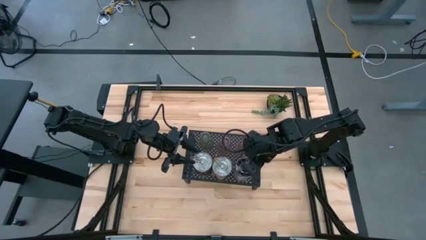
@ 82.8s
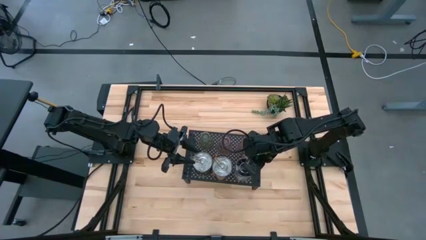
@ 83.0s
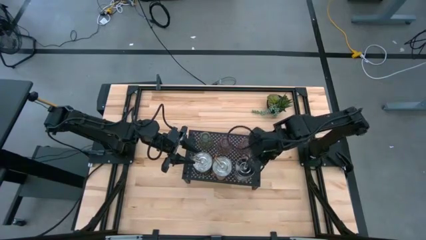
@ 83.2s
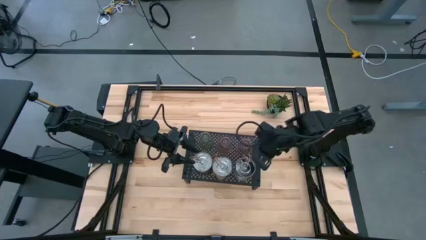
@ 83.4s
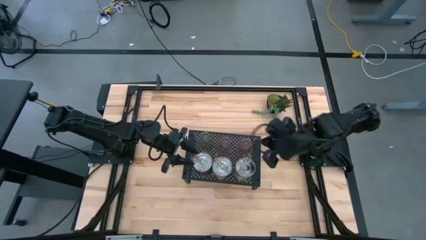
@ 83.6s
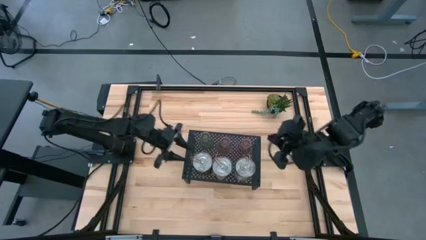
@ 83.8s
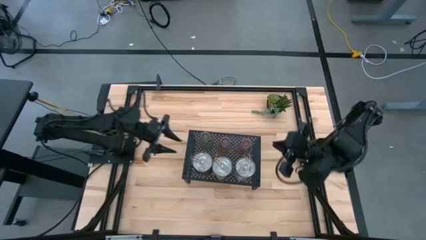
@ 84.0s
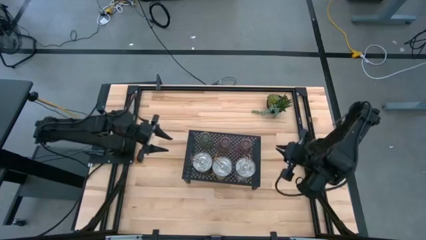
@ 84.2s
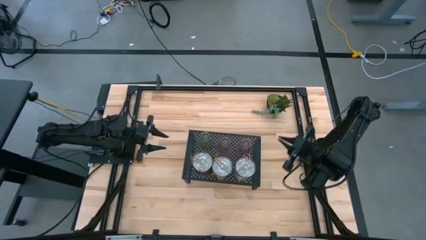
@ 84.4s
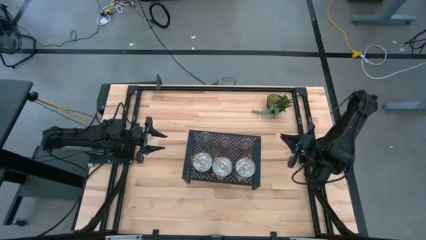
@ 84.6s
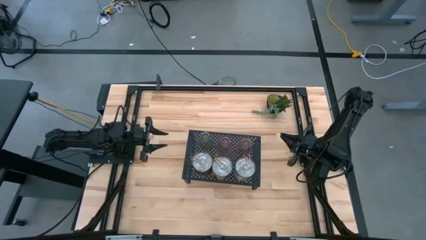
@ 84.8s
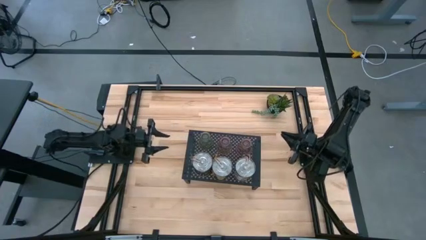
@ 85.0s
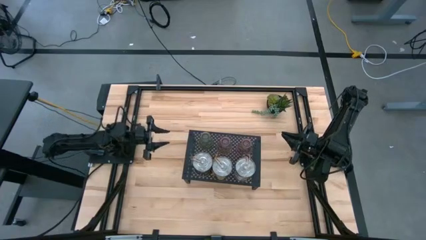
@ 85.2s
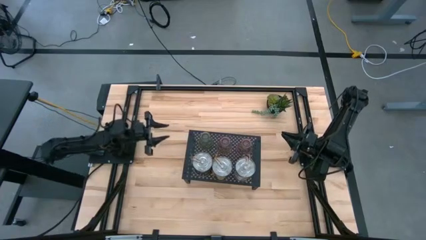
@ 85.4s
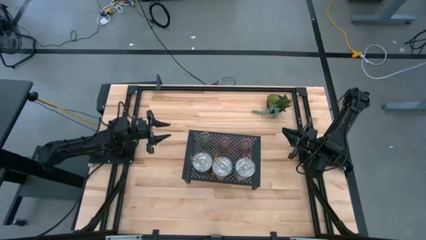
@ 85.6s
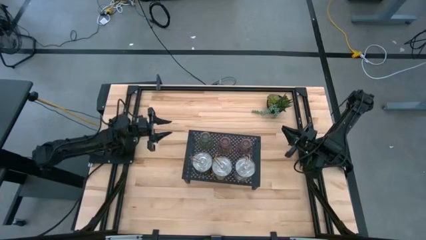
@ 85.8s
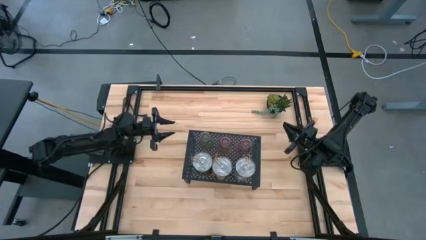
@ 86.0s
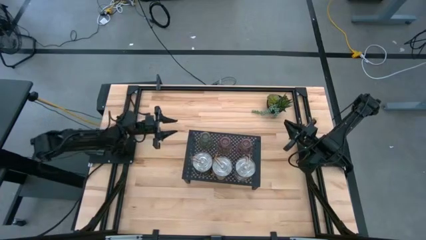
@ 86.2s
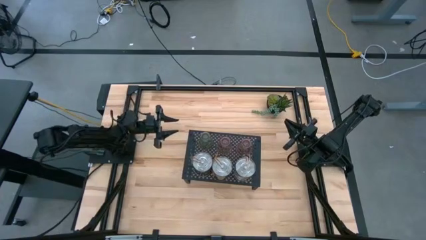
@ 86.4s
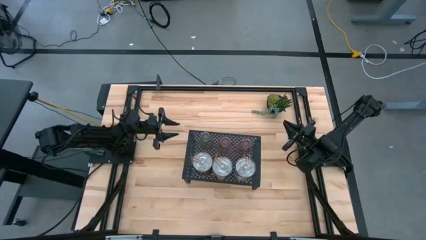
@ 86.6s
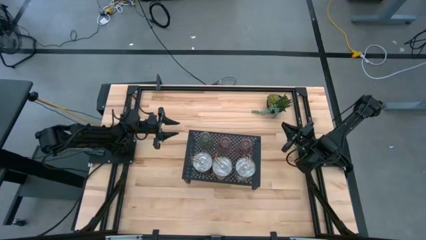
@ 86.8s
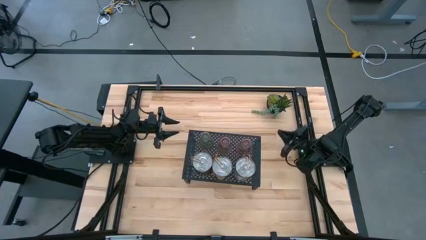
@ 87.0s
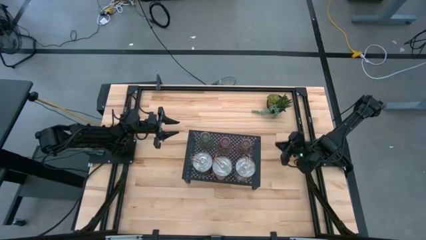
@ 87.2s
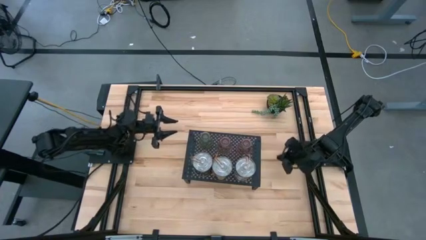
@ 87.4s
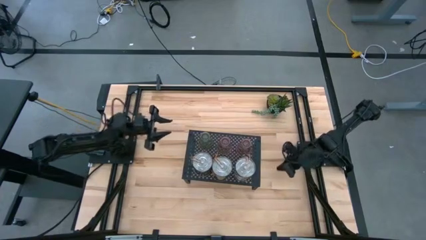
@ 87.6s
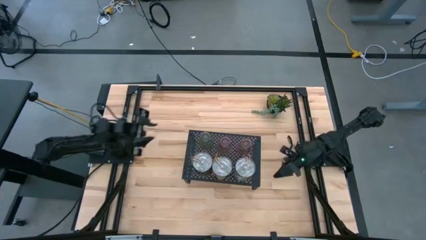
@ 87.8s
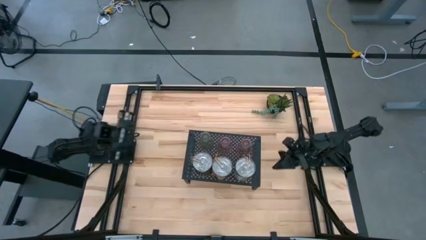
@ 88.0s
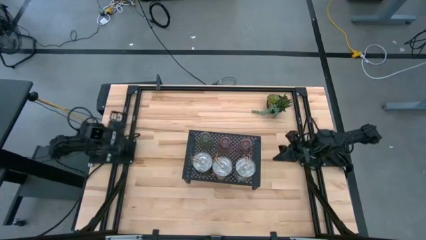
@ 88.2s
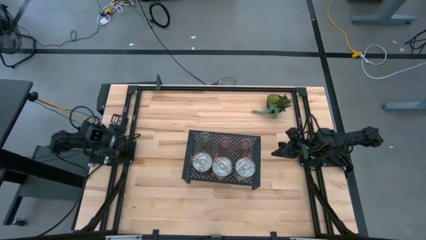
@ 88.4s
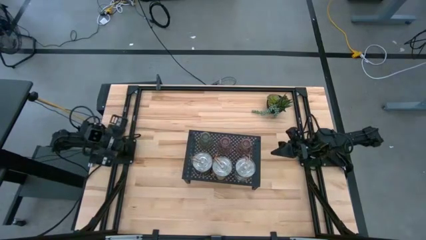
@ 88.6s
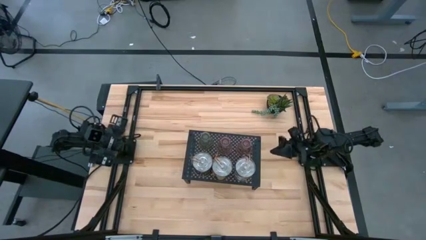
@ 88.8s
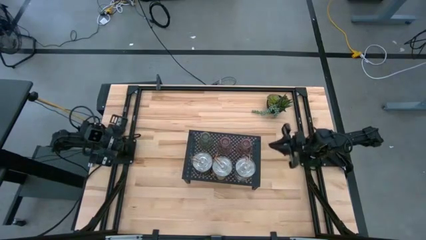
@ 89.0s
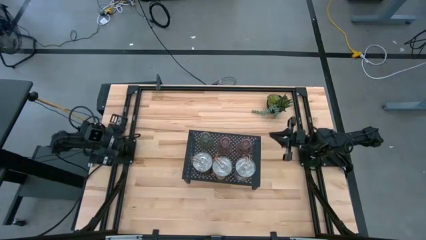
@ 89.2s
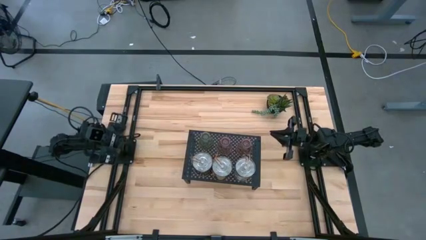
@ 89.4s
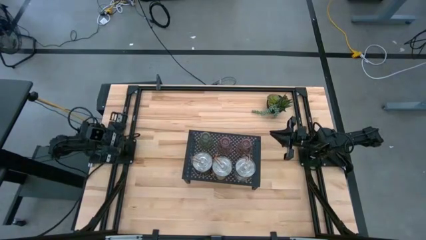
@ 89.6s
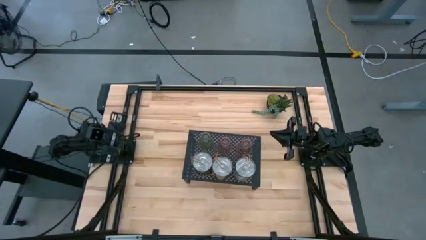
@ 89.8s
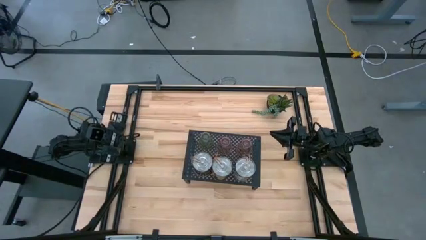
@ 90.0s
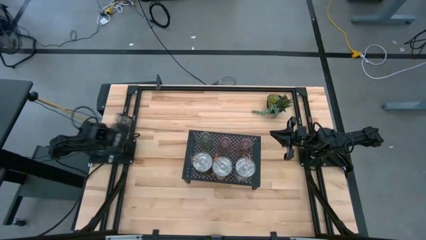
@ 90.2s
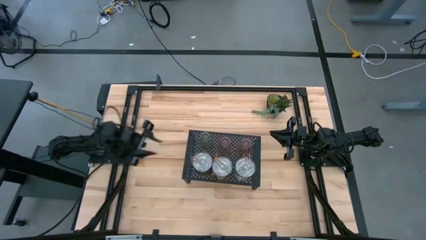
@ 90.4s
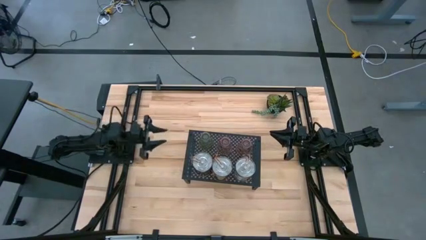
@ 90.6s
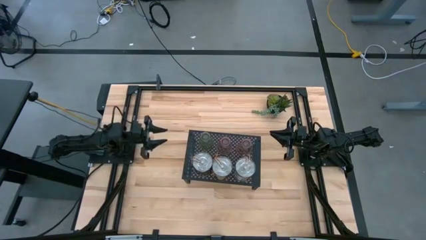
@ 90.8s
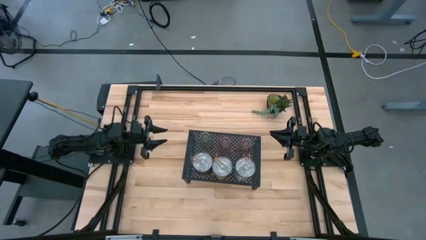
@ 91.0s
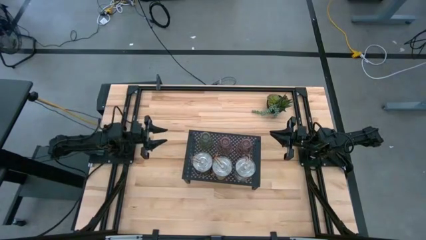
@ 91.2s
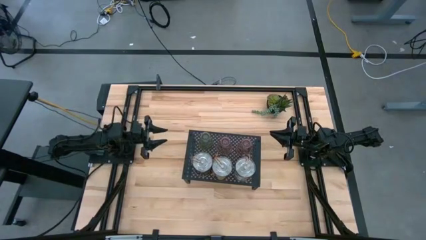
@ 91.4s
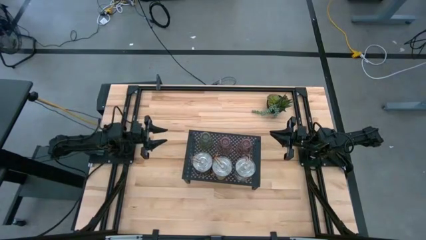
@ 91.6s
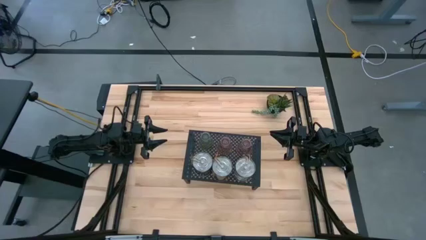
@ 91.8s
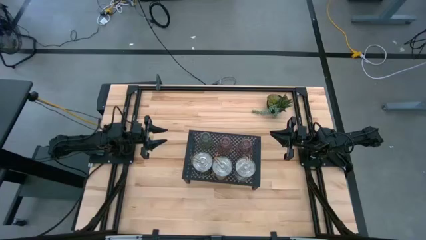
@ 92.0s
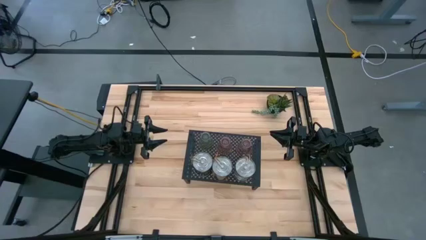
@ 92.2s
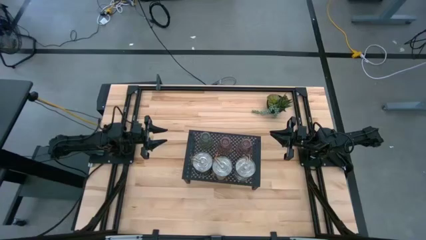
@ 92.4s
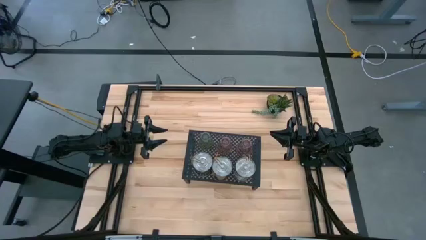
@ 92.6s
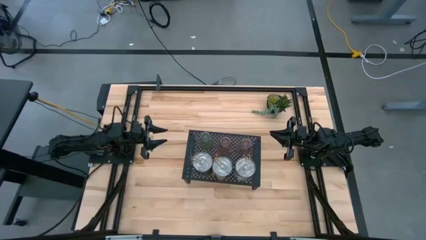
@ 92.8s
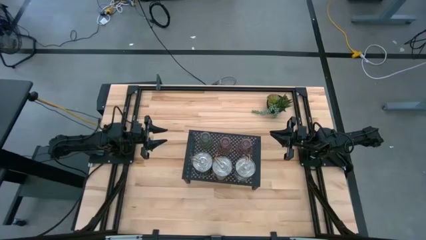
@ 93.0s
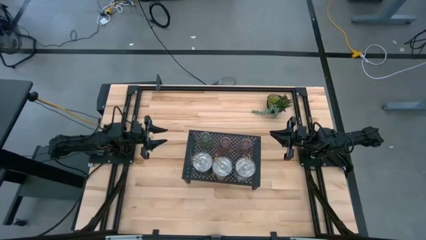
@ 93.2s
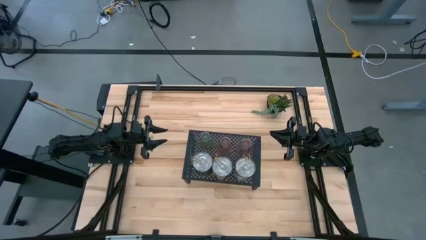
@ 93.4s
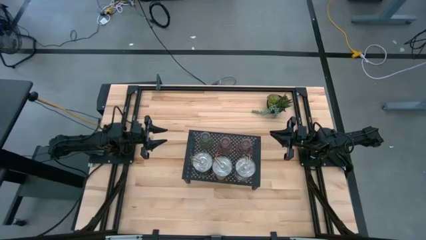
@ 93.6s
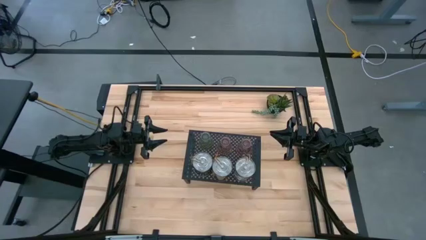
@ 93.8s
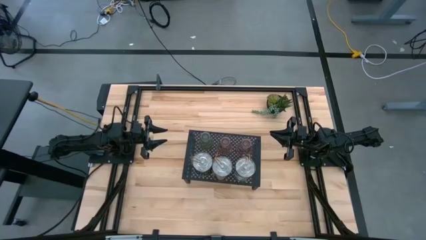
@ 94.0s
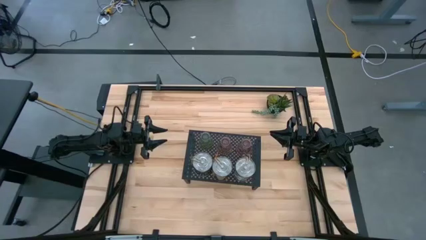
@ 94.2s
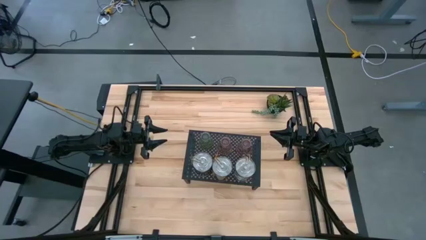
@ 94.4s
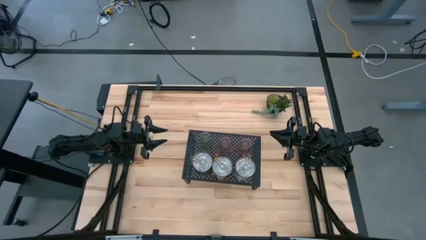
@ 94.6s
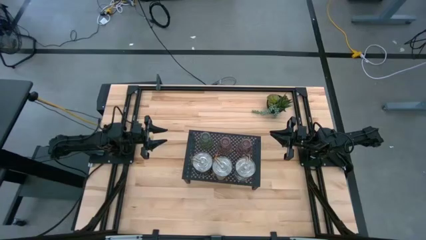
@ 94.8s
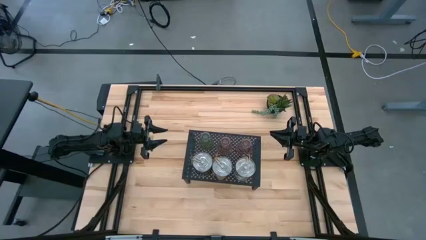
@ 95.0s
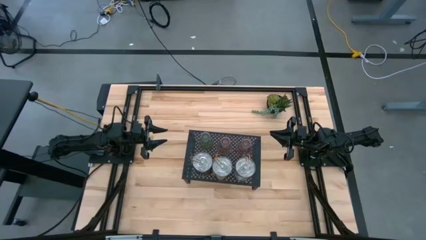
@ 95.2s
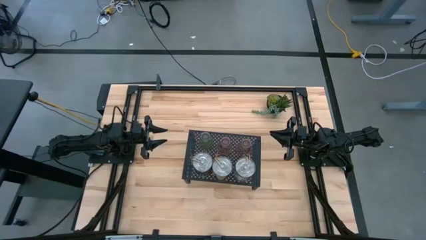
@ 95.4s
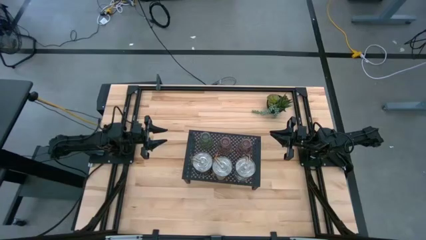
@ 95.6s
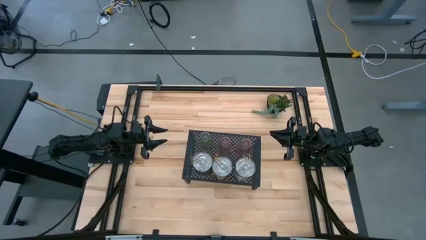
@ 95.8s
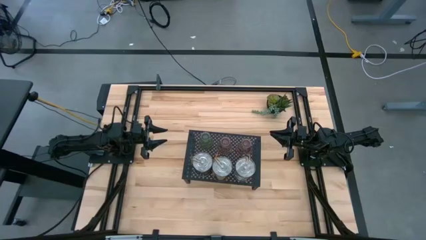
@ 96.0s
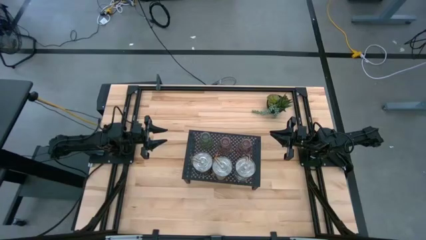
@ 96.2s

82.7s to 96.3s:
Task: Pick & Place candle stick holders
Return to Home Position

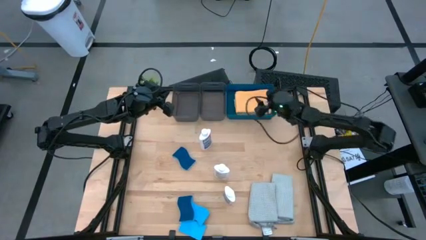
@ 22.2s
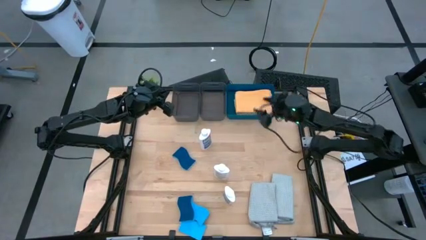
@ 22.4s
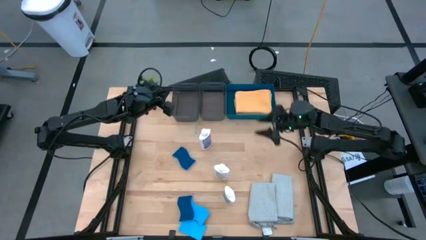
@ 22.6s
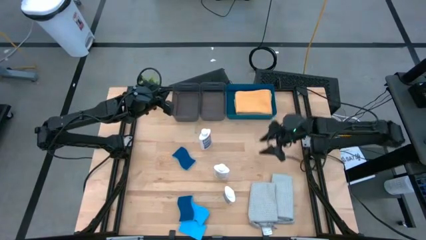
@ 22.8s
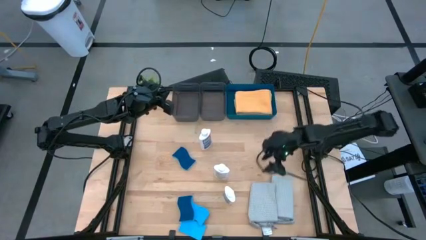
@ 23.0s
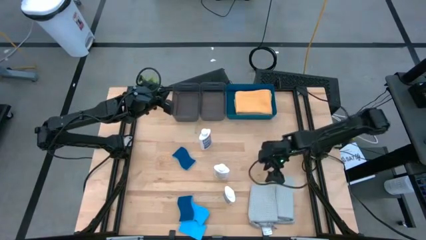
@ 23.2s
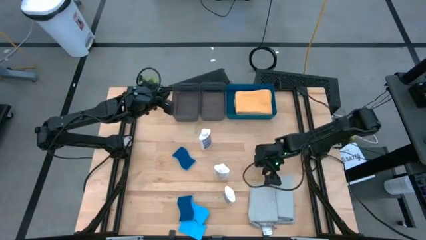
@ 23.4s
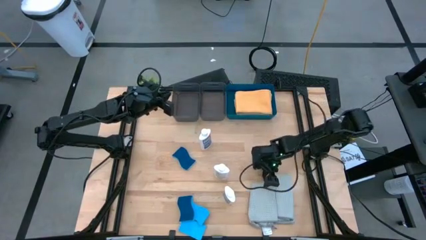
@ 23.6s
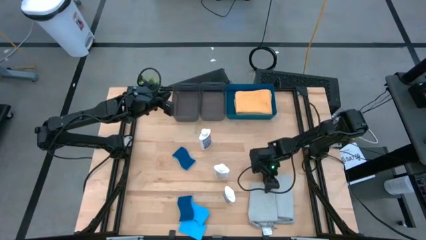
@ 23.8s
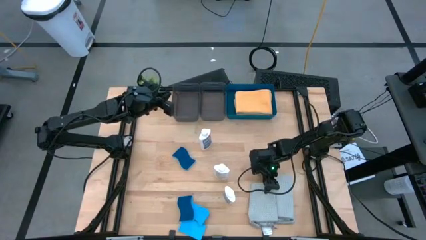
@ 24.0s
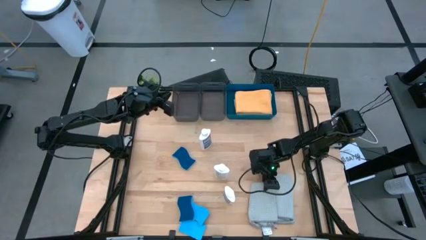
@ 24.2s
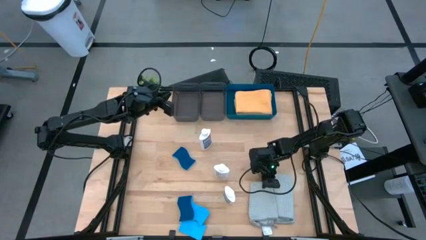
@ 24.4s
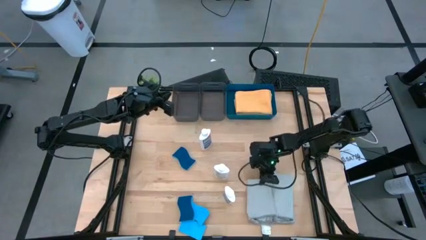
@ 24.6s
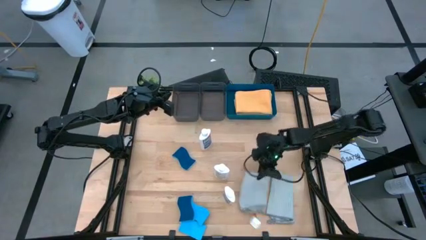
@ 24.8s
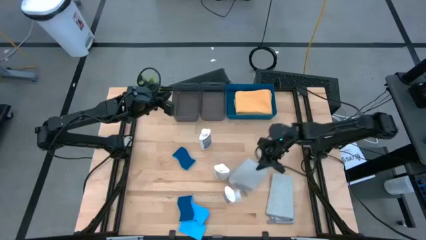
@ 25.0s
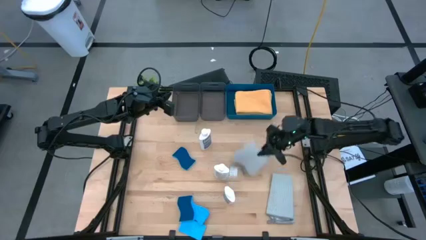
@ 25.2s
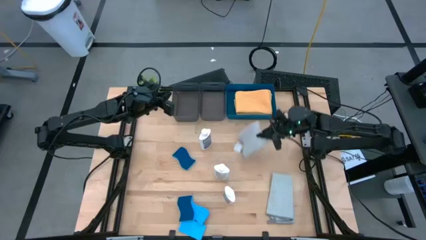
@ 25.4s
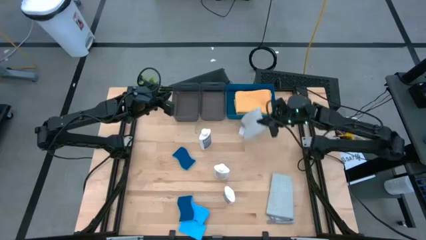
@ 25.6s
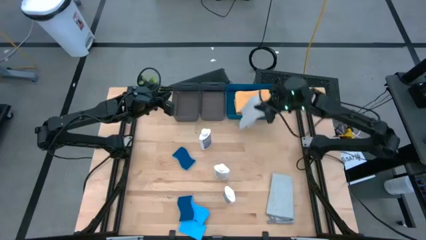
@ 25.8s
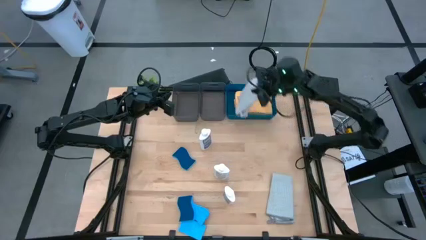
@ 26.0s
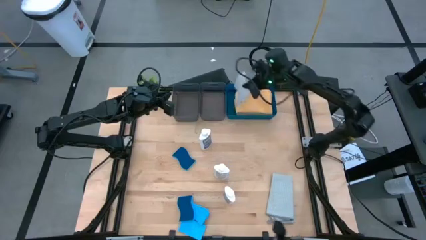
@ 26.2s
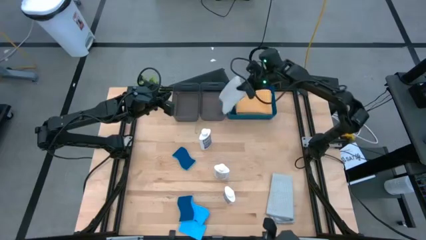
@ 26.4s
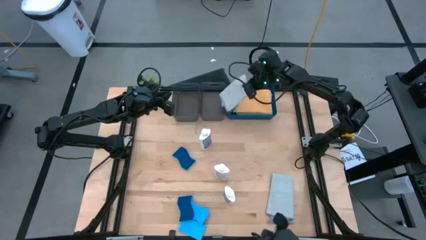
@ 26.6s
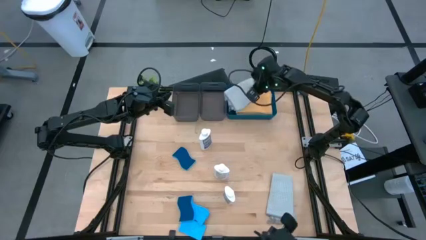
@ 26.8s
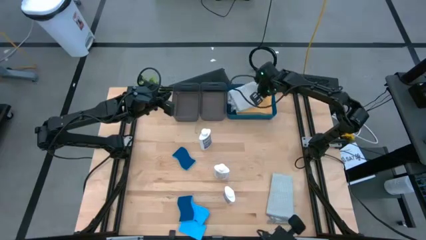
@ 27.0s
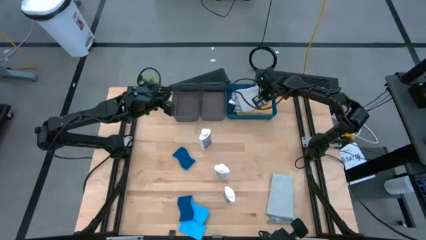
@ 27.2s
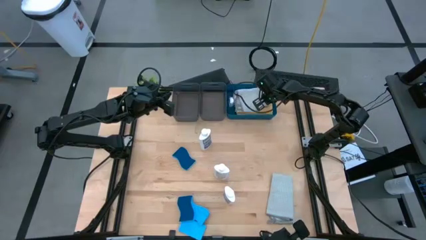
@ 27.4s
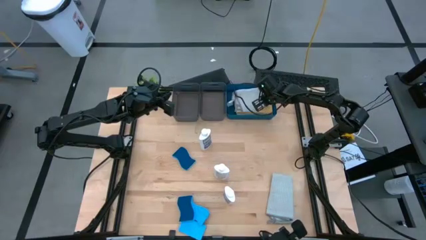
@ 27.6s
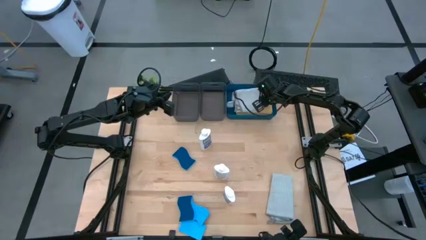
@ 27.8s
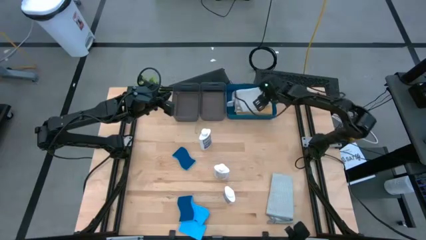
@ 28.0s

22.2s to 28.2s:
Task: Pick & Place Kitchen Items
Put the gray towel into the blue bin
